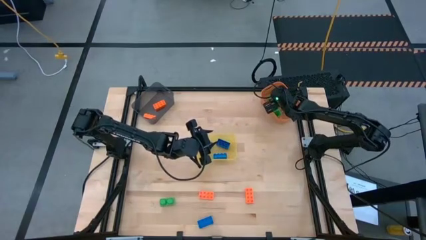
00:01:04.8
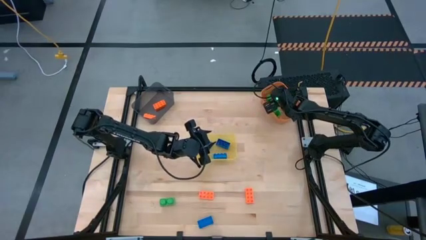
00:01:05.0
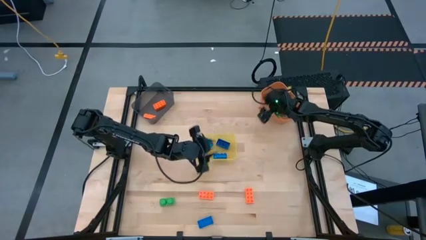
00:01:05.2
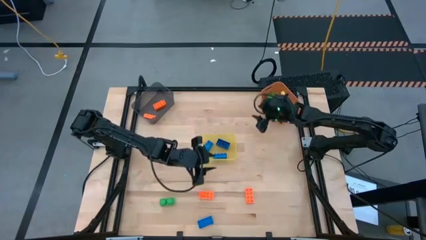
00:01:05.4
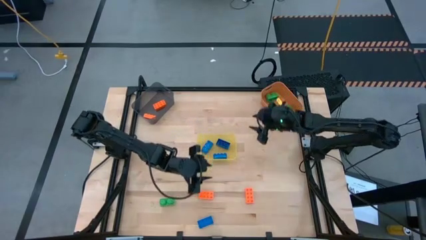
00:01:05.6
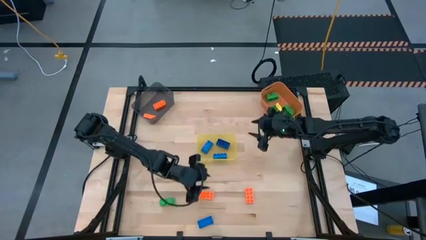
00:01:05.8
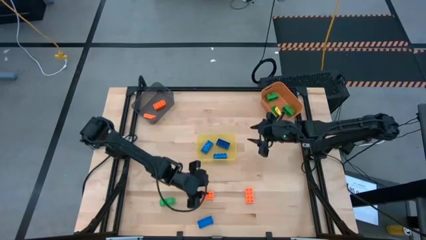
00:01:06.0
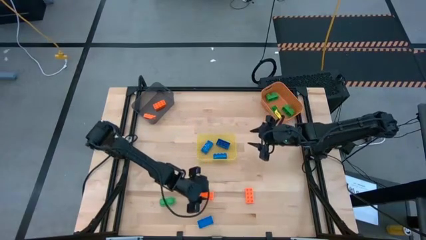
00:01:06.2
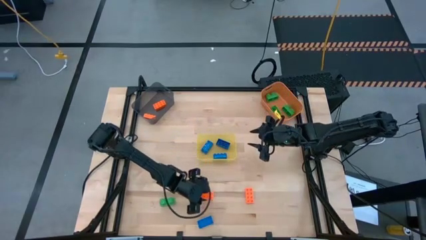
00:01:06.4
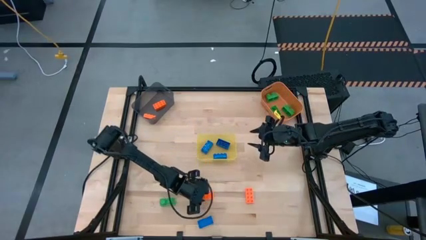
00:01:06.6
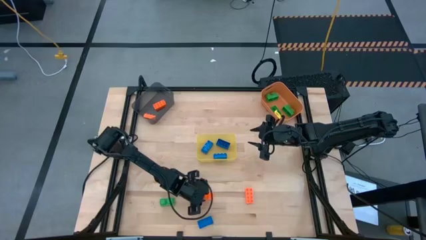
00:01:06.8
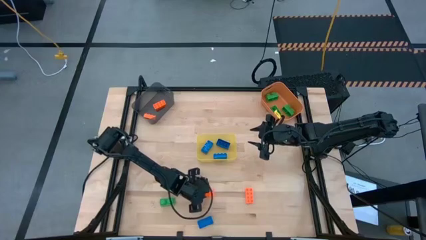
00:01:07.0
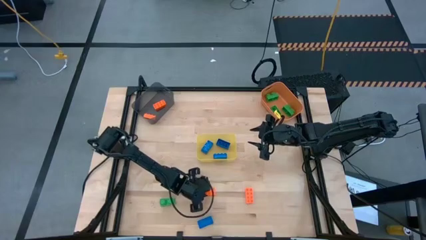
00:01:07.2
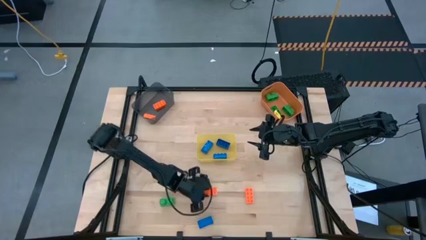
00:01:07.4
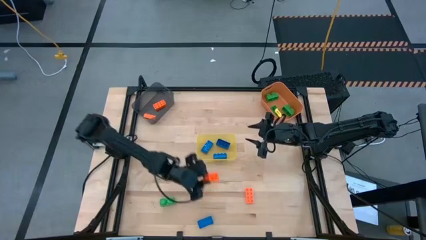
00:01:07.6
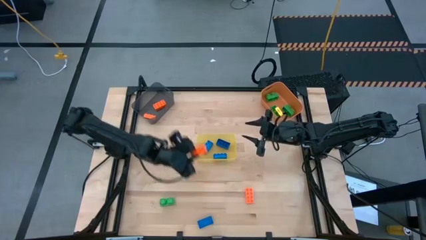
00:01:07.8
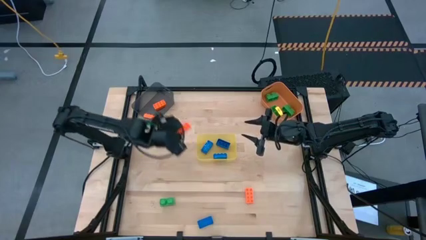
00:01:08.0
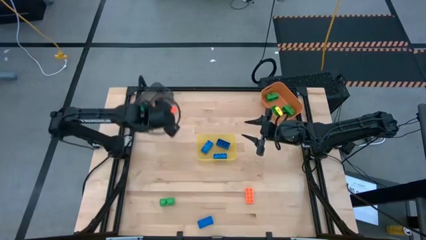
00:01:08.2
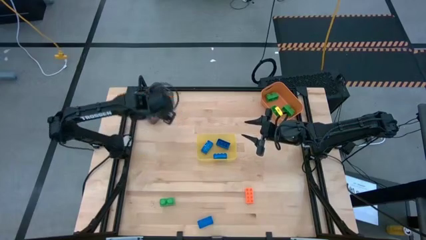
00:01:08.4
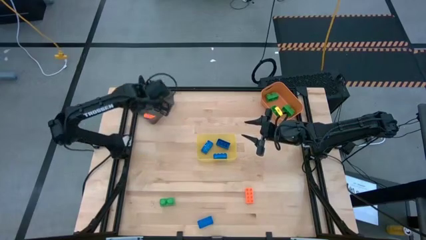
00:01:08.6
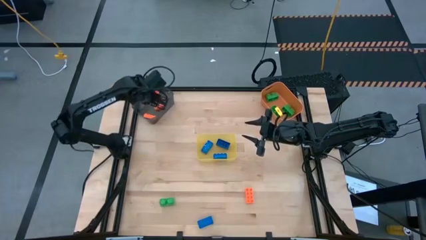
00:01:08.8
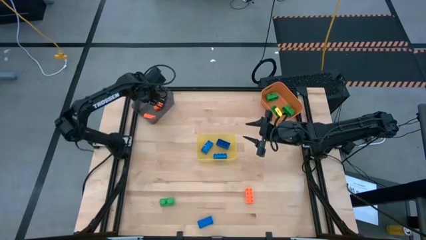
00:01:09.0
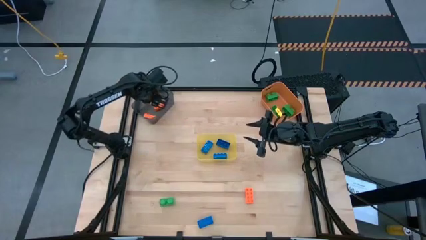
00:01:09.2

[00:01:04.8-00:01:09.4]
Task: Sort & place blocks by color
Put the orange game piece into the black bin

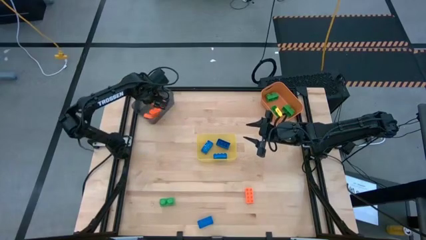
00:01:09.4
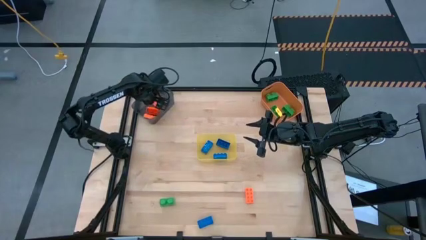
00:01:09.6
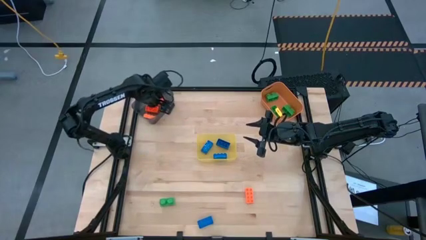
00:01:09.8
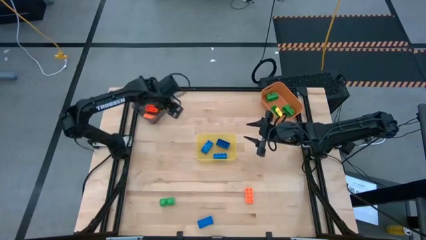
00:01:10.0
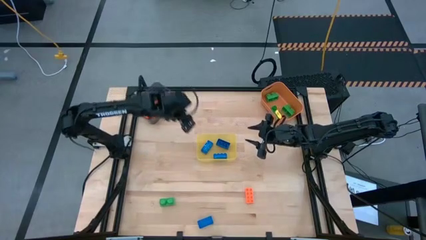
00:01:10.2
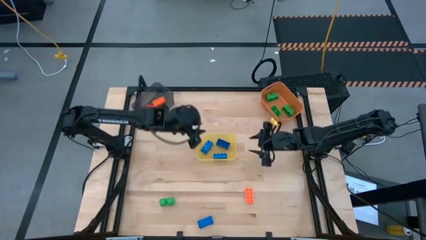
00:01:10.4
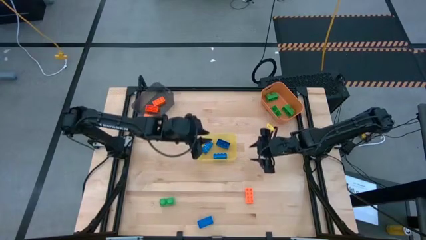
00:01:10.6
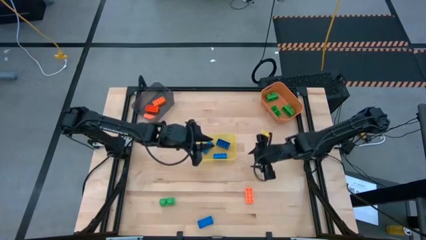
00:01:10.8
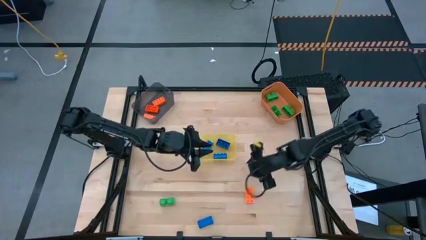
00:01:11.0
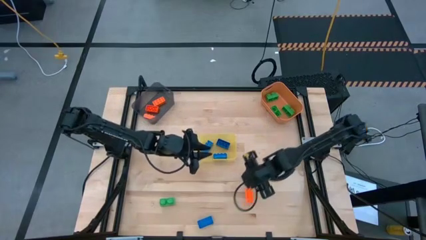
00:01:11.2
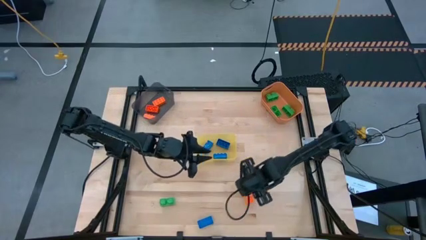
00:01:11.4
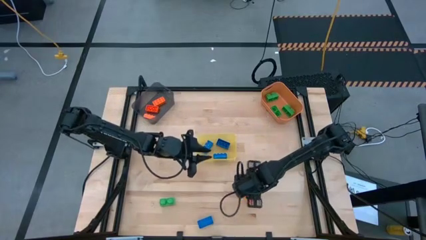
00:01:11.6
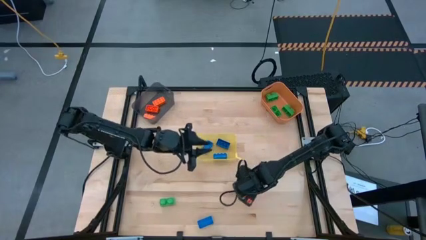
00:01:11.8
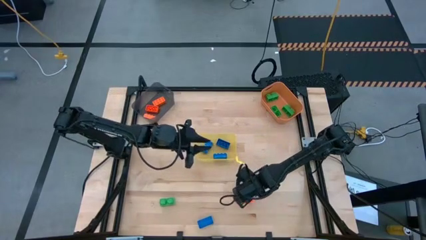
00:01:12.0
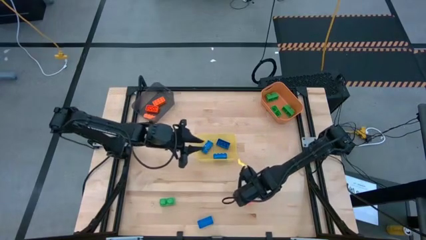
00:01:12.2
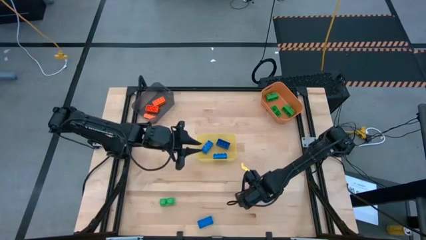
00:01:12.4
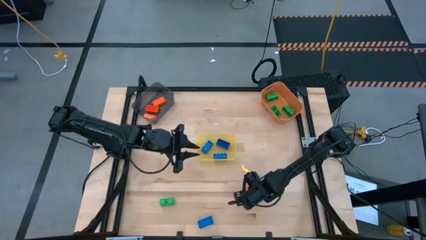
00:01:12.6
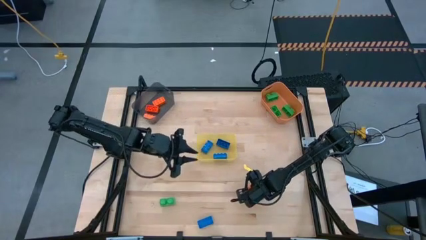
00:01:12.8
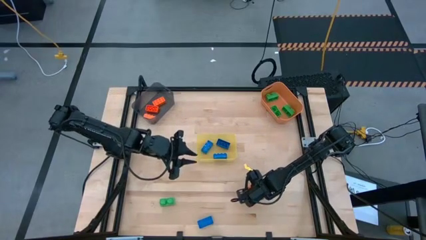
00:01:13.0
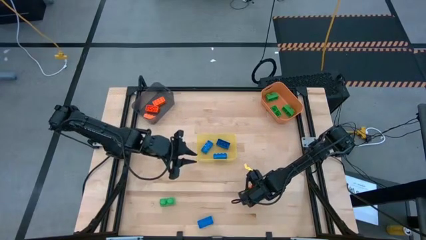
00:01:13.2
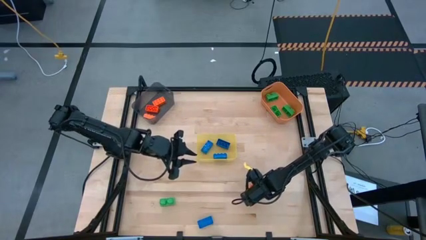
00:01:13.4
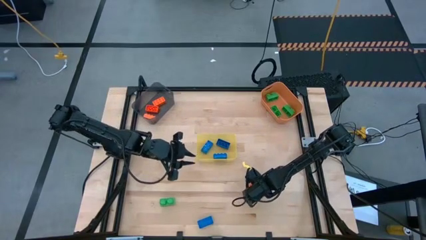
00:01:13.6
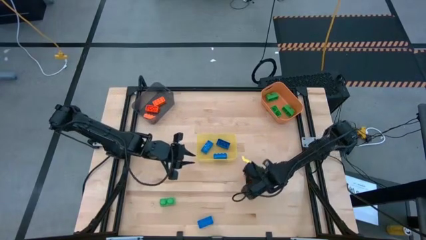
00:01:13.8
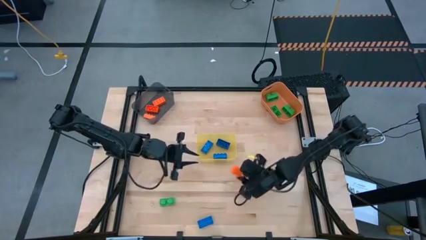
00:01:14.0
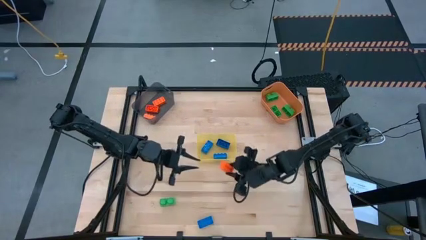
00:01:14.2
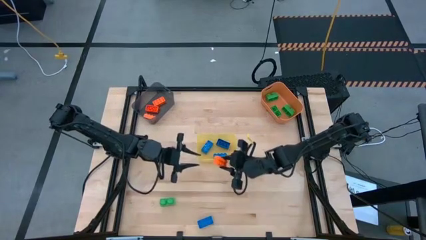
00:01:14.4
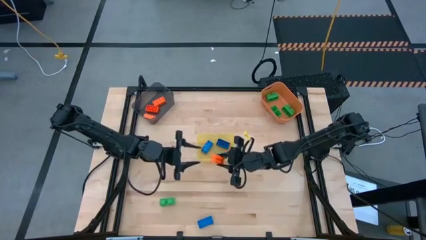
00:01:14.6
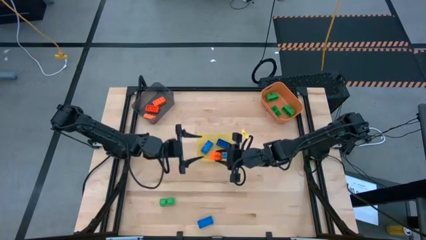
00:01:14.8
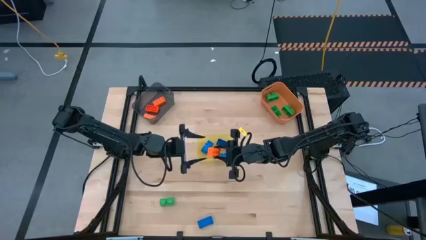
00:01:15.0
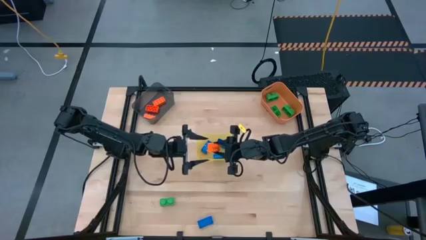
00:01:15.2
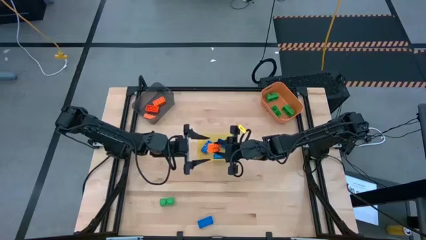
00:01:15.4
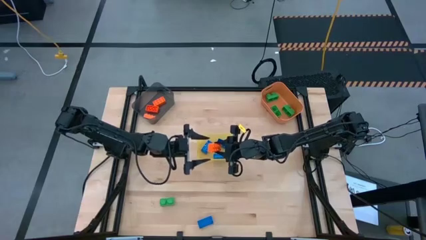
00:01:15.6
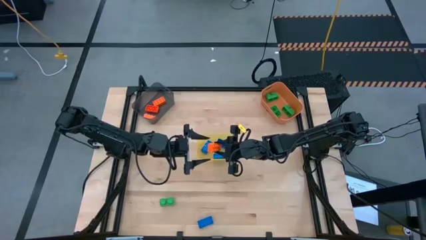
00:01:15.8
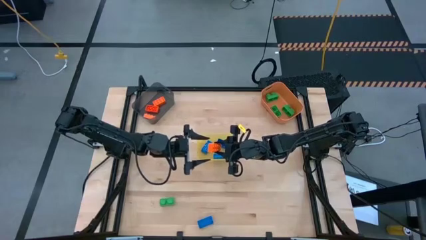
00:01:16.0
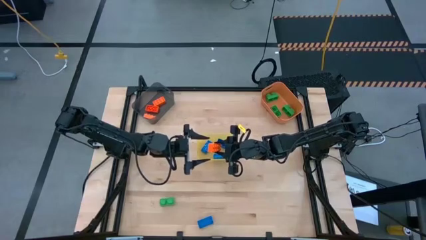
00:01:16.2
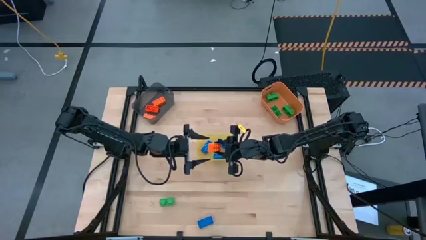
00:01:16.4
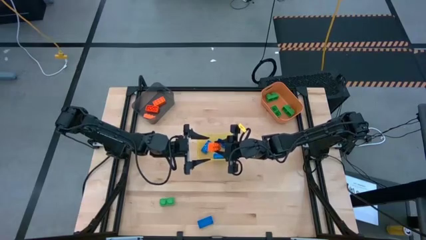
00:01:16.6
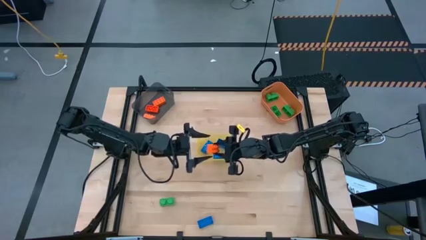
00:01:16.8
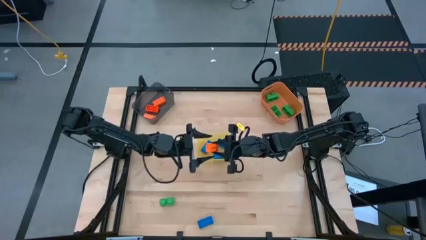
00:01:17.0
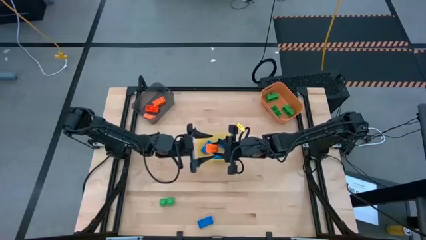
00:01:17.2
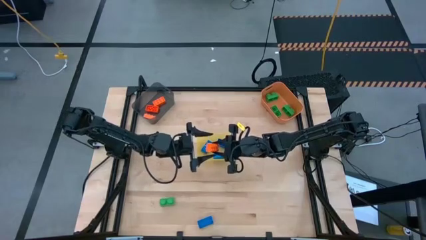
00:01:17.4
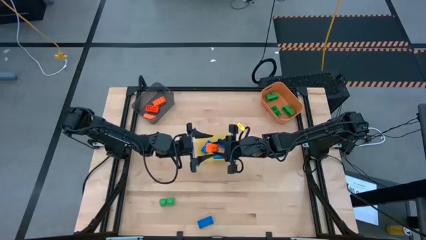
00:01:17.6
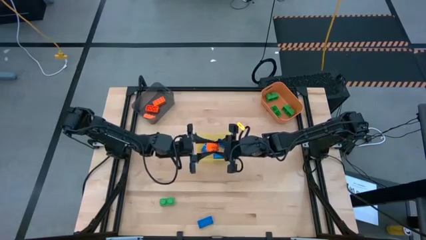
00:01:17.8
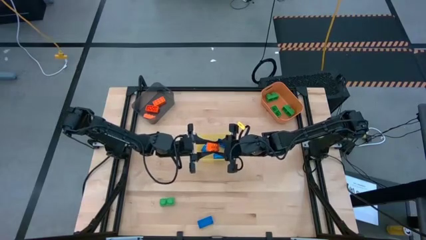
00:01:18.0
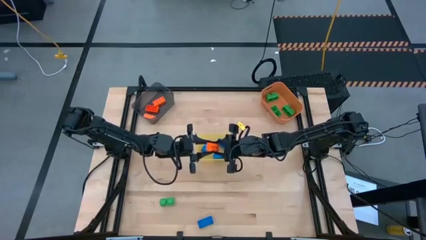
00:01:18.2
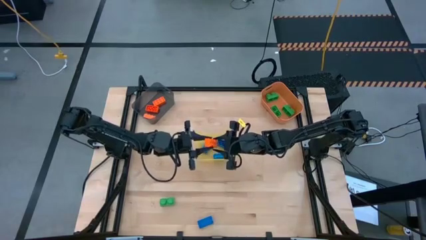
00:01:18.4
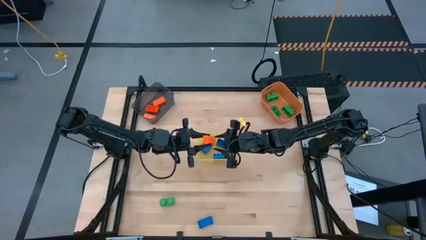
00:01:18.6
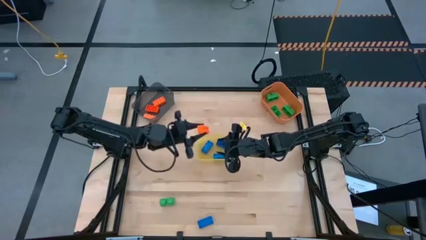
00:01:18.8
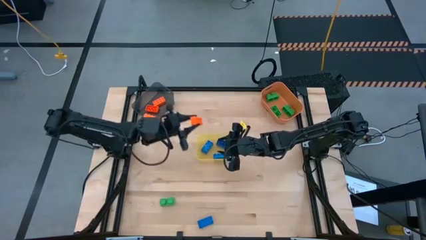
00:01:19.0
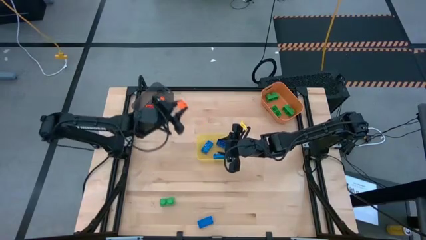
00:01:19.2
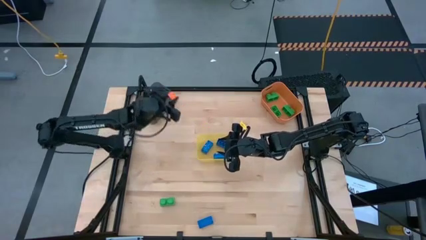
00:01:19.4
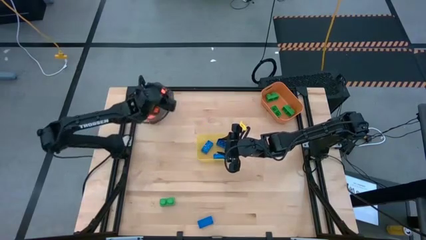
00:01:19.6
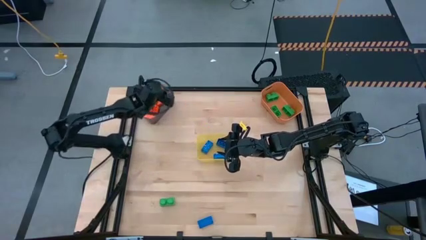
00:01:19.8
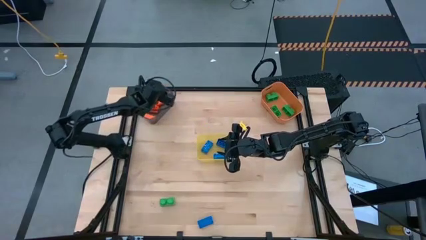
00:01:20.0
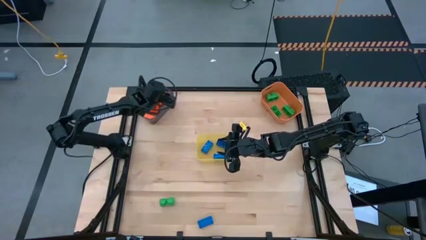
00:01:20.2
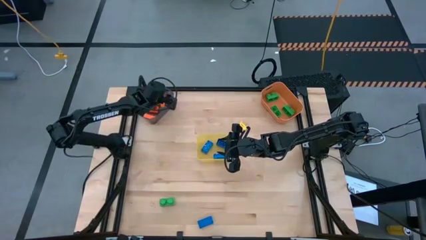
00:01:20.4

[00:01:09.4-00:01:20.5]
Put the orange game piece into the black bin
